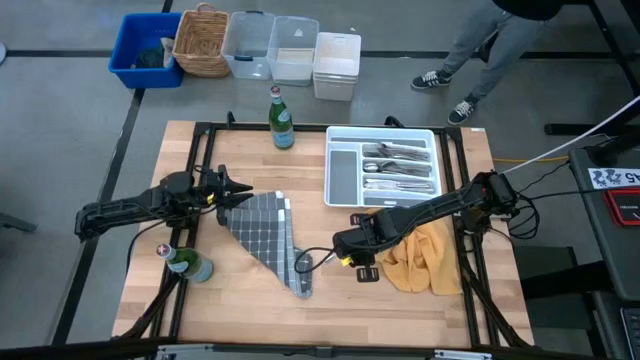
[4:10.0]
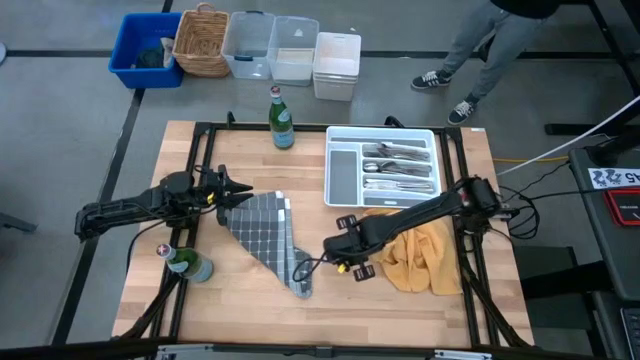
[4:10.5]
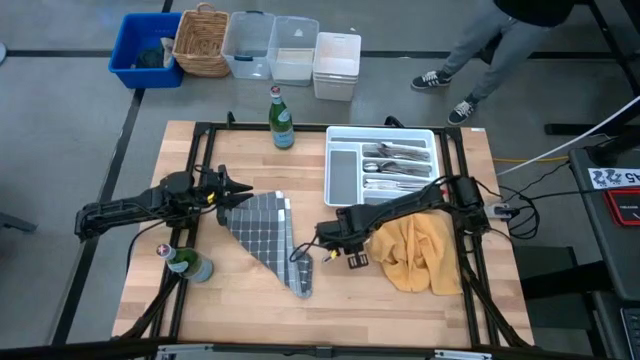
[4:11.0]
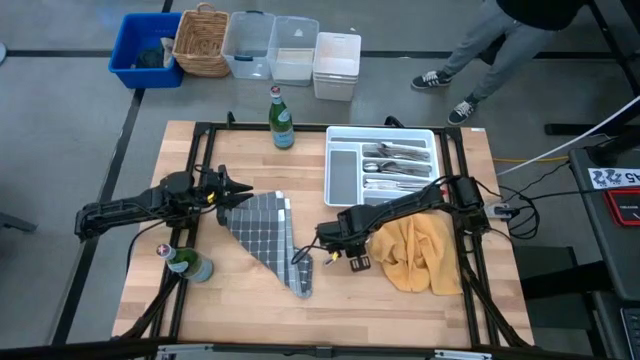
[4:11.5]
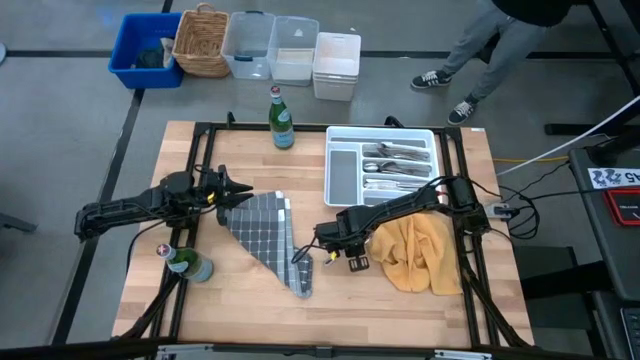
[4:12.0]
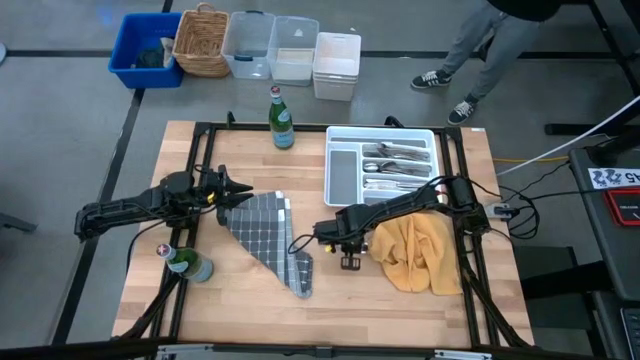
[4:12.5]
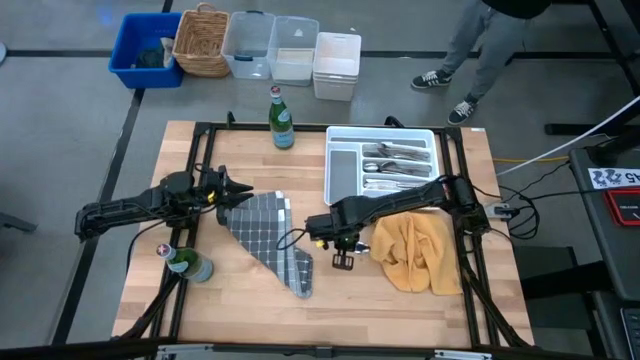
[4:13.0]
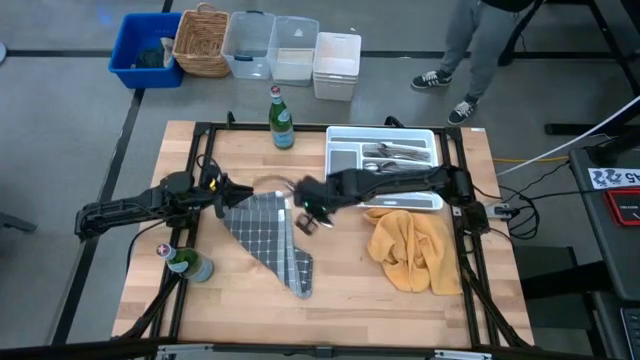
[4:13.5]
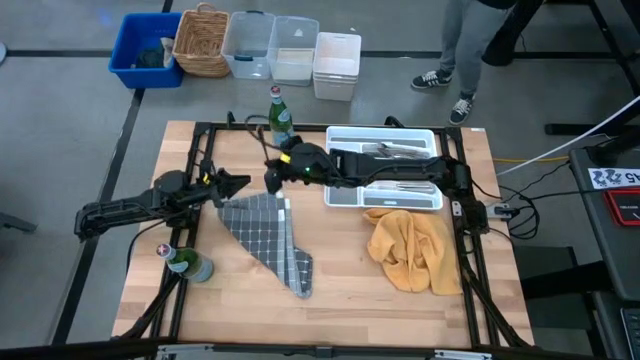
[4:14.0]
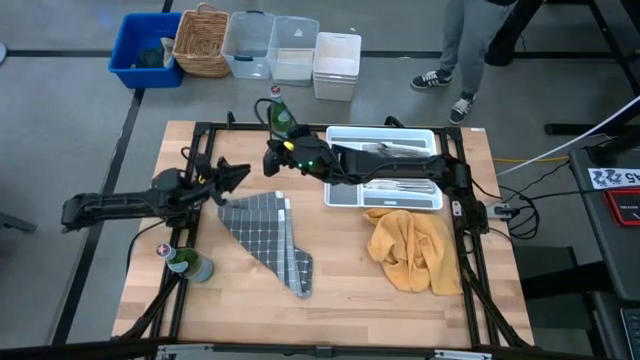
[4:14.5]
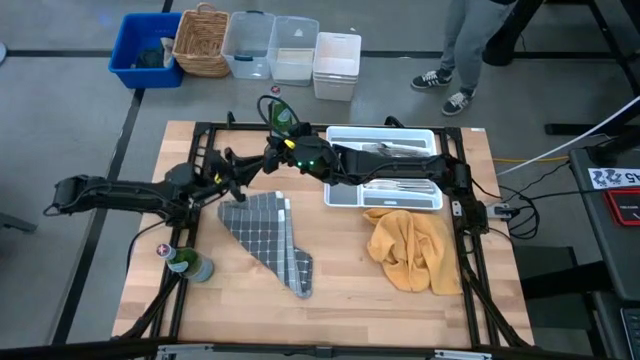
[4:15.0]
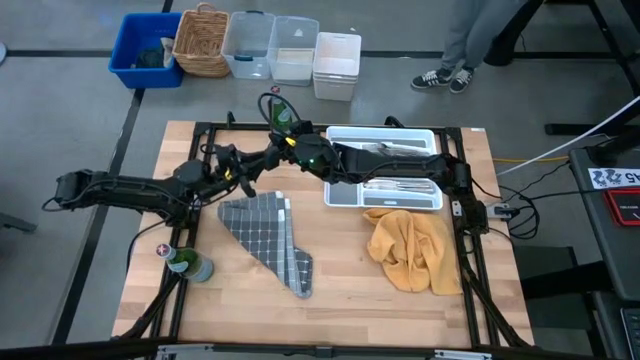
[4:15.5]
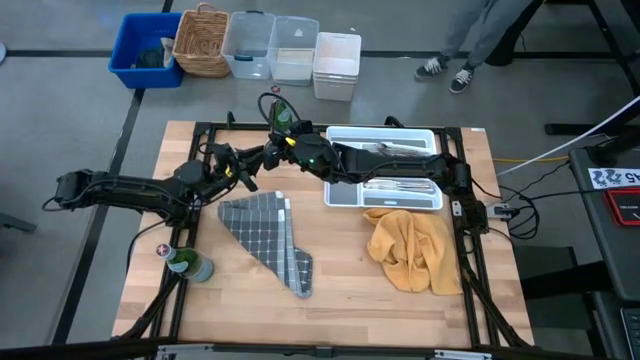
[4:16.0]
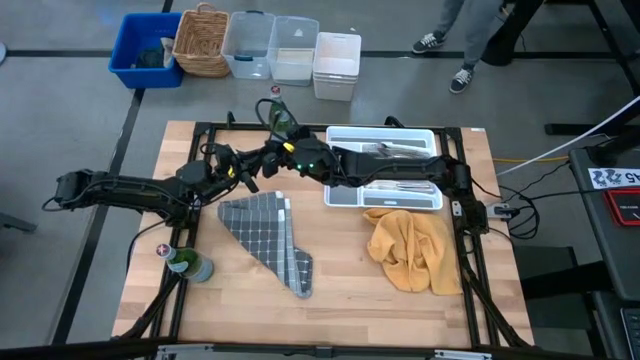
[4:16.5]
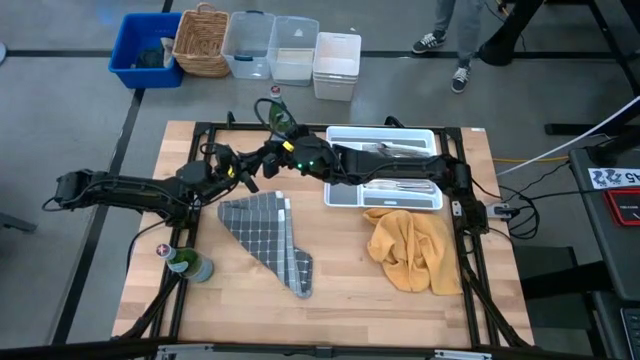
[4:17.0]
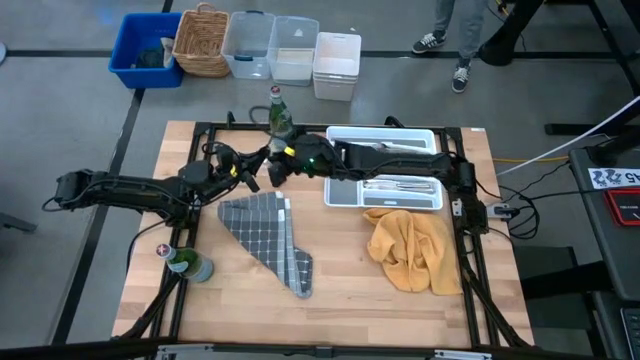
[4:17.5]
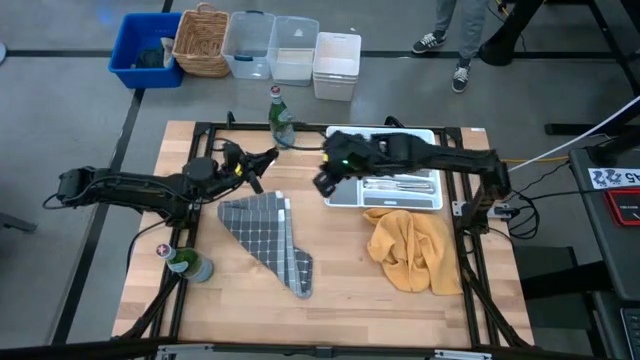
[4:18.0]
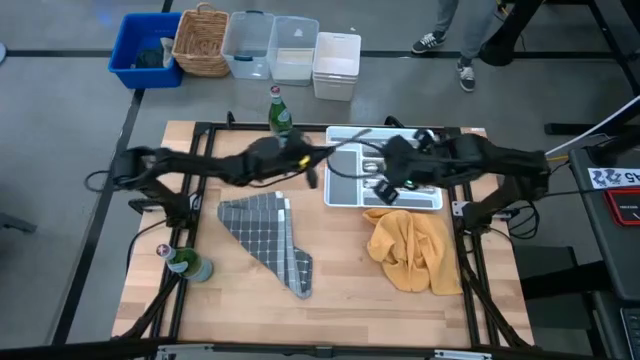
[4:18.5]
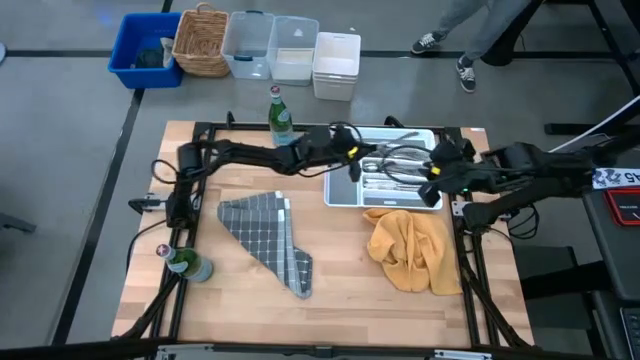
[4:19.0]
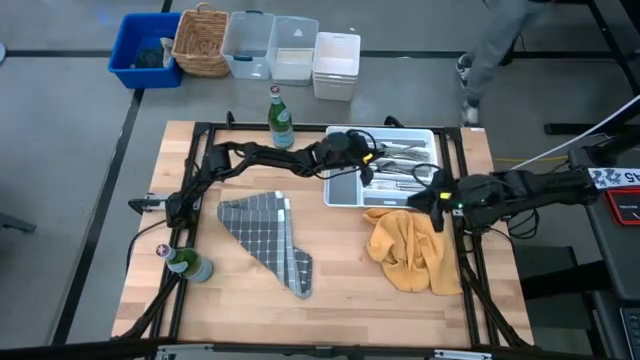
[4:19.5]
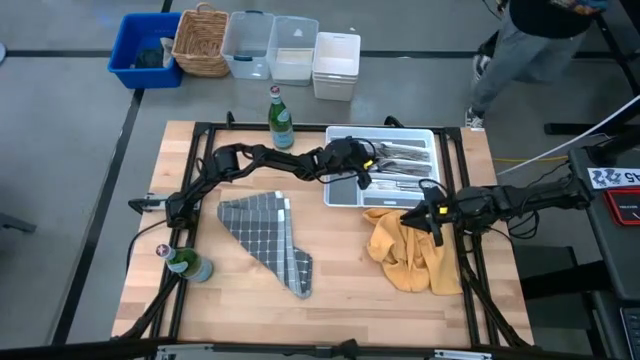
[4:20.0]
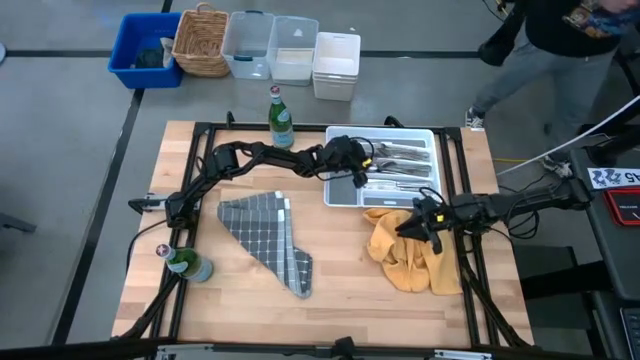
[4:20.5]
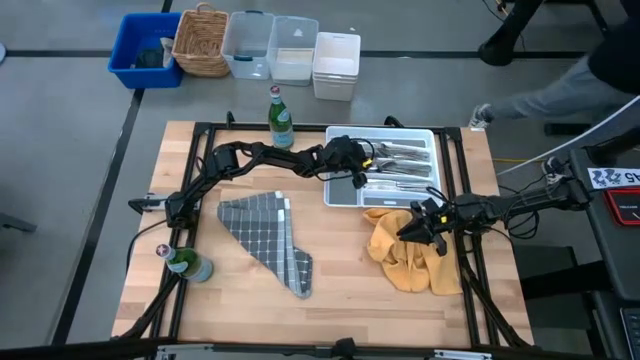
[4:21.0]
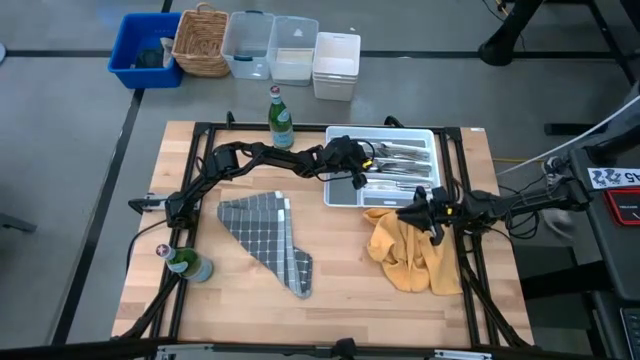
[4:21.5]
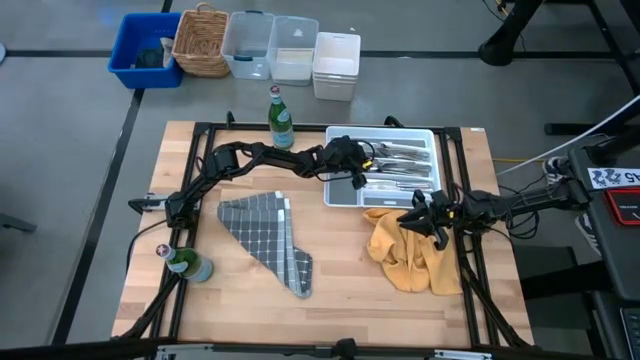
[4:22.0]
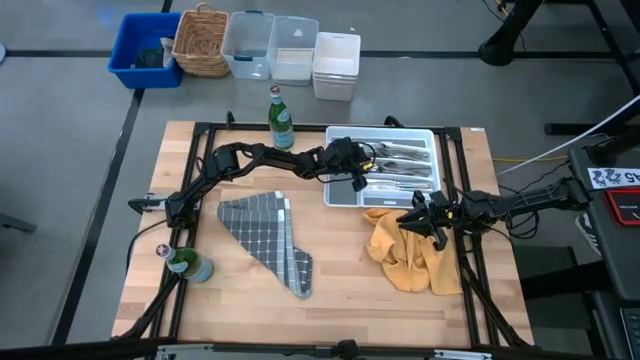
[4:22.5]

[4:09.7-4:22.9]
Put the silver spoon into the cutlery tray

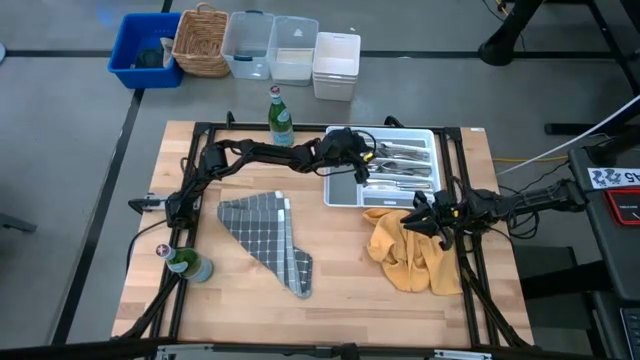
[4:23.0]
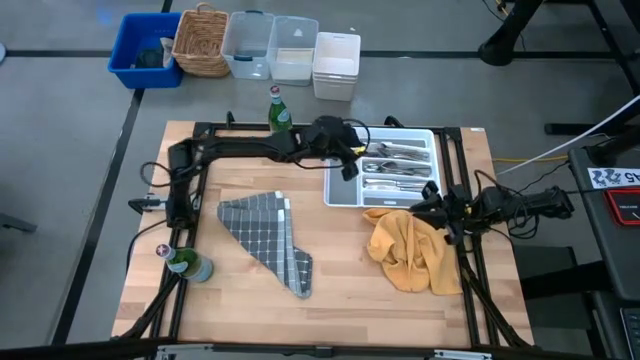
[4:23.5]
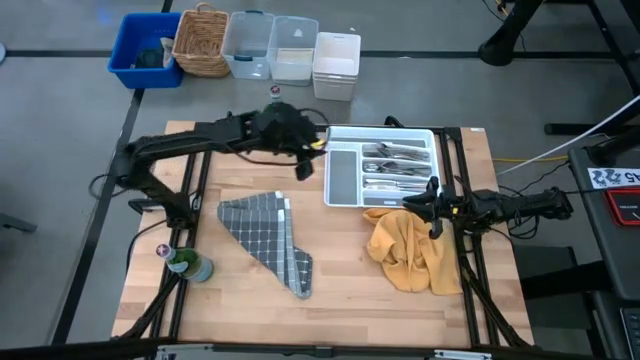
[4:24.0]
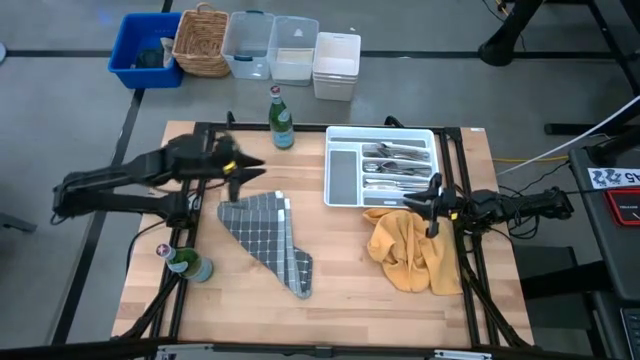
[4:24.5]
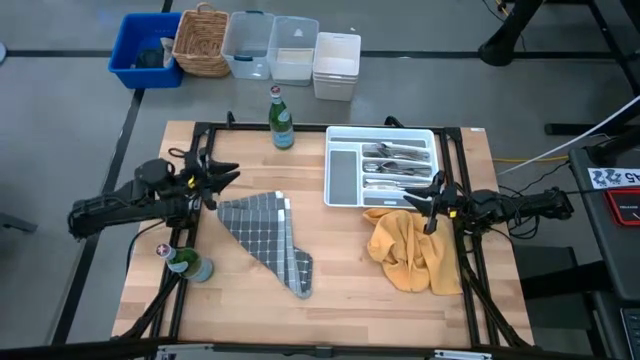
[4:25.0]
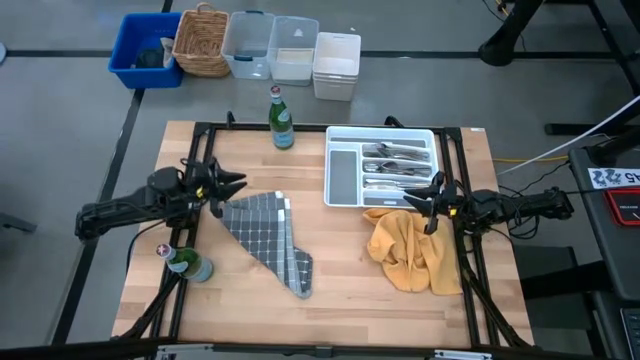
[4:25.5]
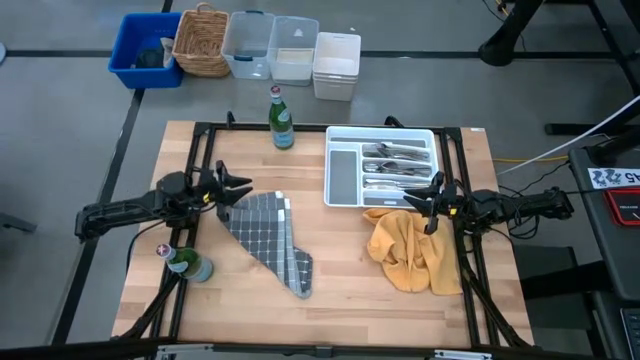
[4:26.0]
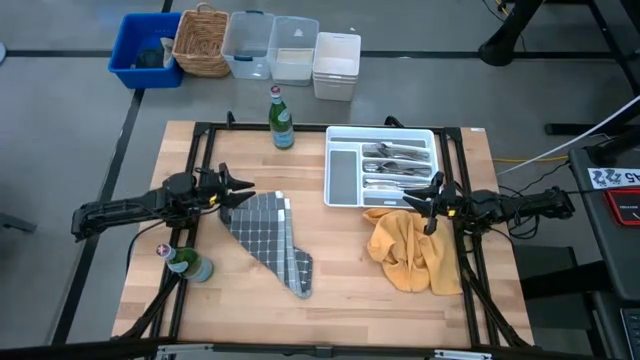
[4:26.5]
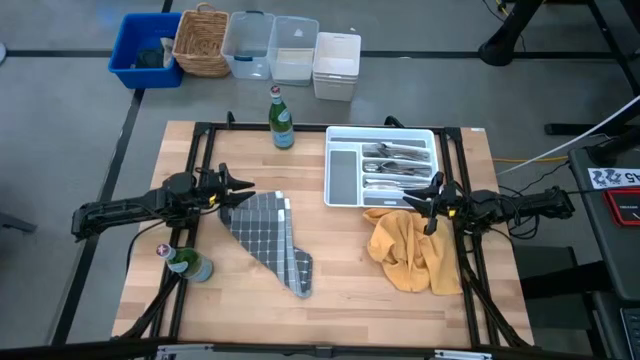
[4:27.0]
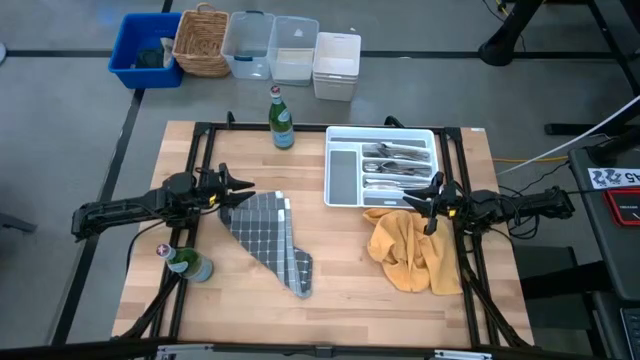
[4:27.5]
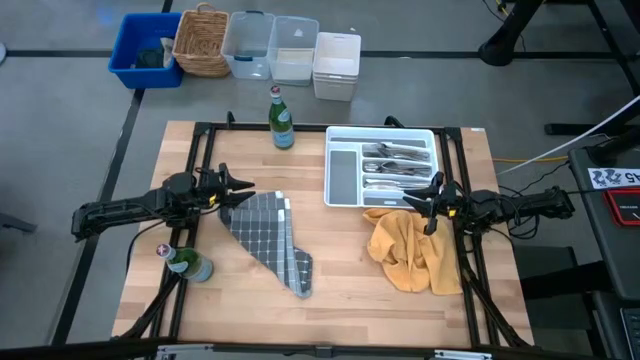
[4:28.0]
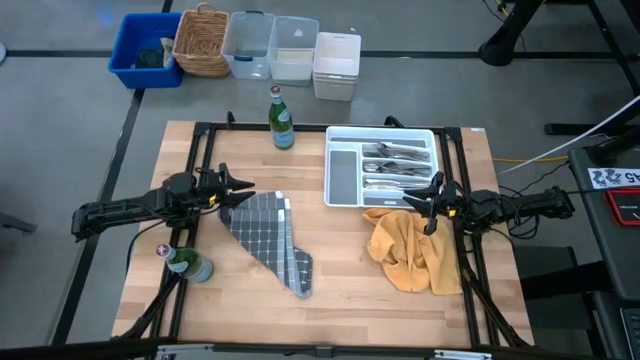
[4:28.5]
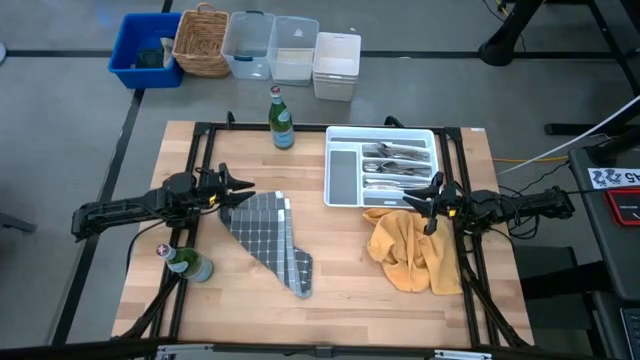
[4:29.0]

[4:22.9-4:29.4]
Return to Home Position
